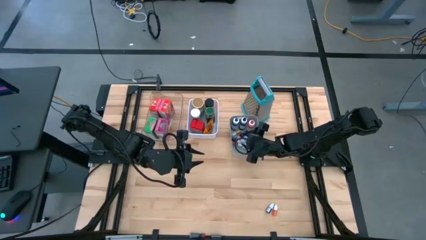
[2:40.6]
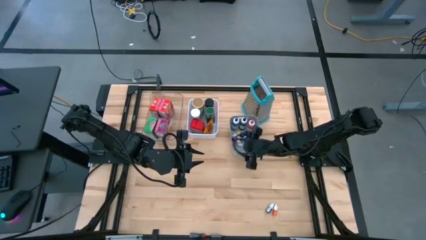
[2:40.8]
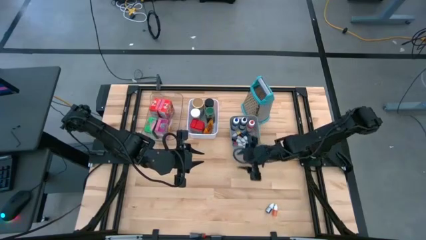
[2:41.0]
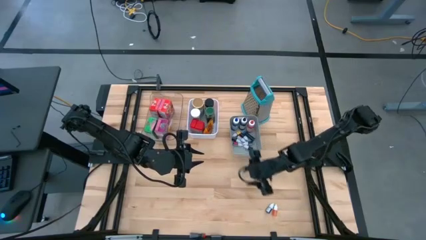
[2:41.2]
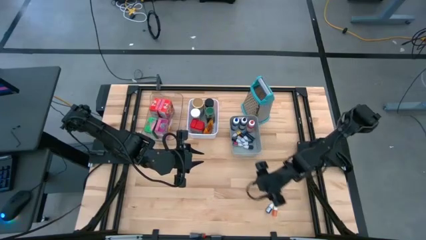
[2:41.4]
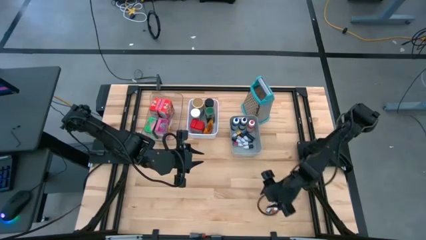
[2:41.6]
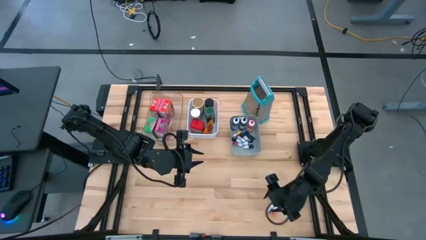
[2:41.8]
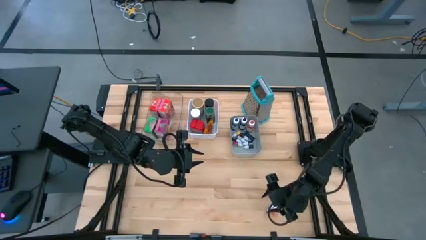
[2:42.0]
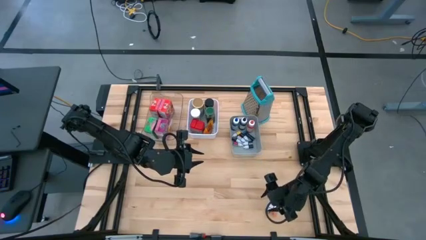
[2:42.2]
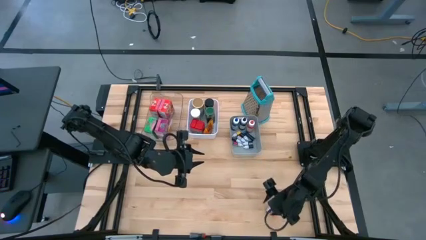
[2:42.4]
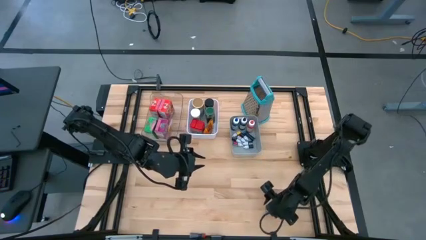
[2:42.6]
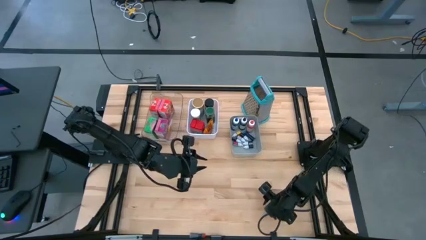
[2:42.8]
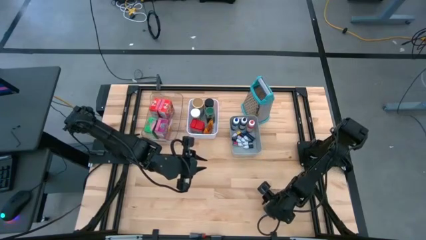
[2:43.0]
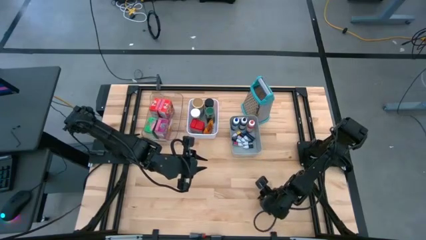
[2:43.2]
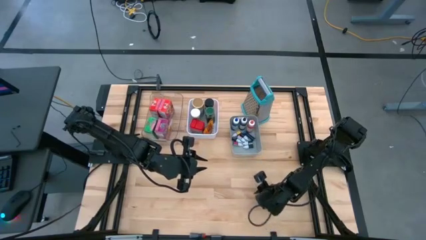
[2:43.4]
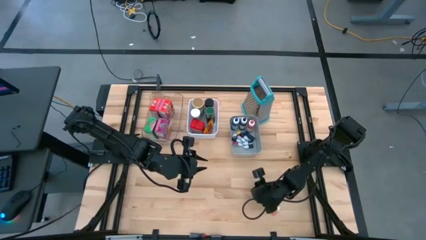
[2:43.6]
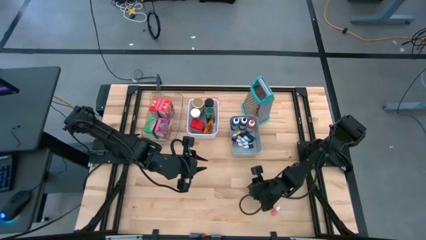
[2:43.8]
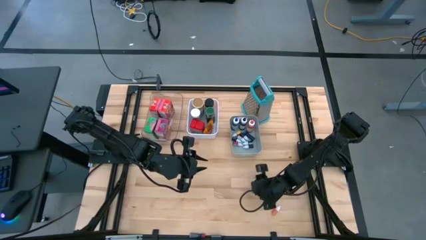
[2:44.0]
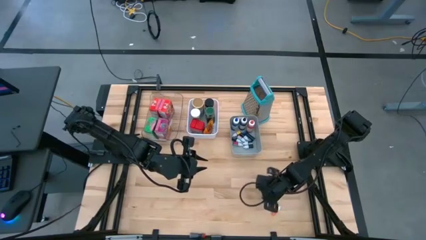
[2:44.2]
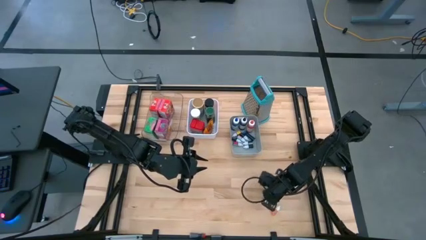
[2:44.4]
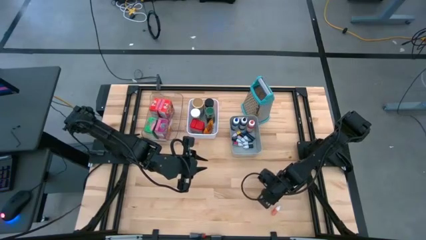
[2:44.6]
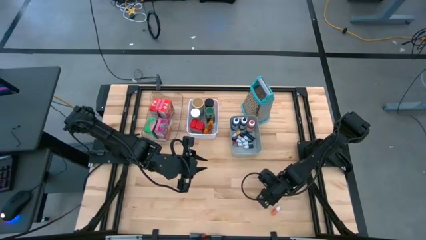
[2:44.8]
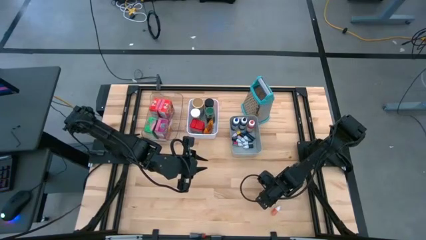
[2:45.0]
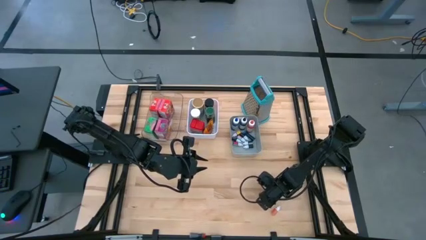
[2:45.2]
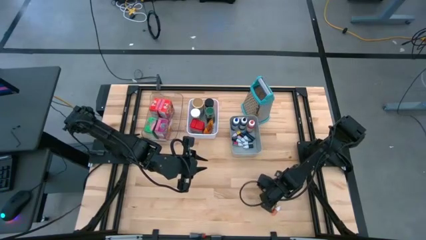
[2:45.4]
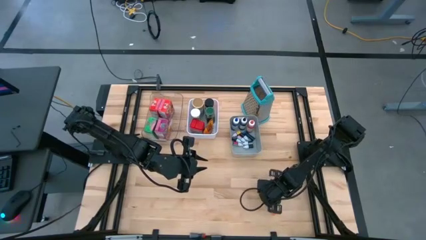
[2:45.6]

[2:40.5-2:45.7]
Task: Pick & Place Kitchen Items
Put the small violet food coloring into the gray bin

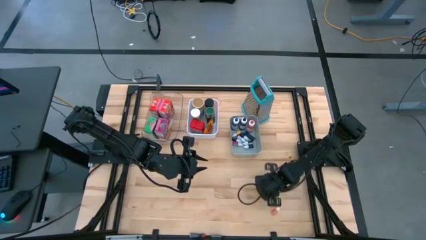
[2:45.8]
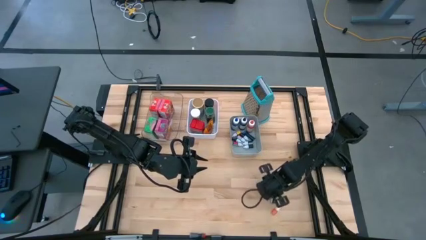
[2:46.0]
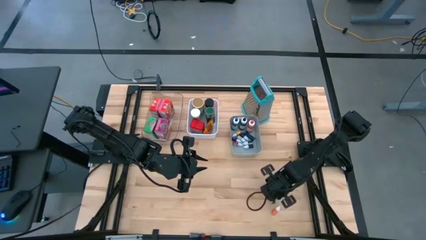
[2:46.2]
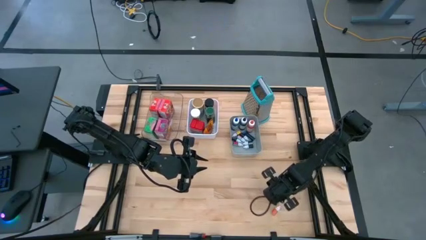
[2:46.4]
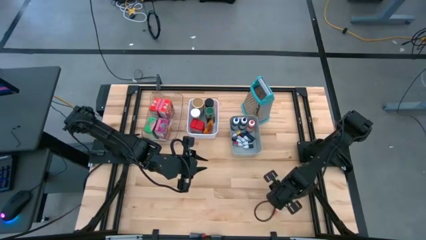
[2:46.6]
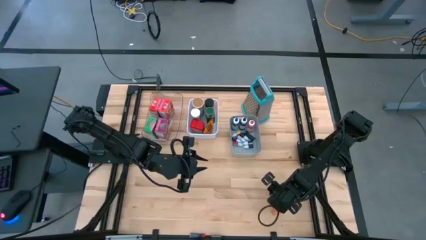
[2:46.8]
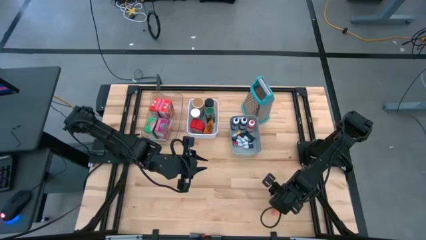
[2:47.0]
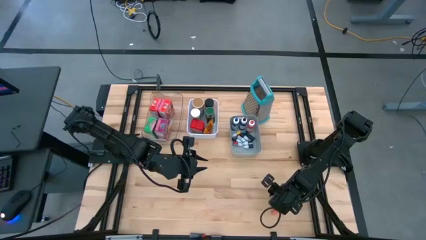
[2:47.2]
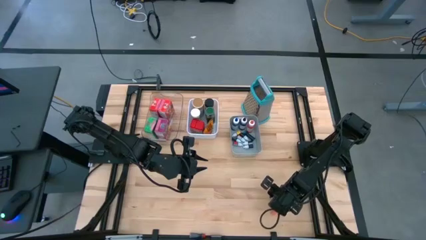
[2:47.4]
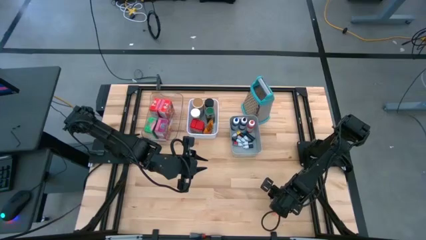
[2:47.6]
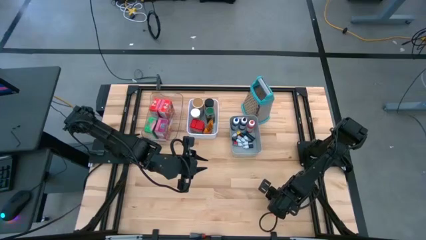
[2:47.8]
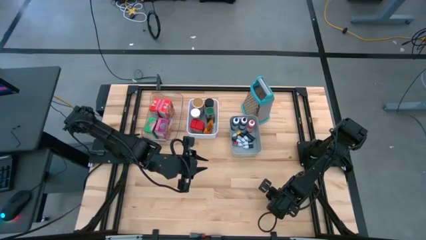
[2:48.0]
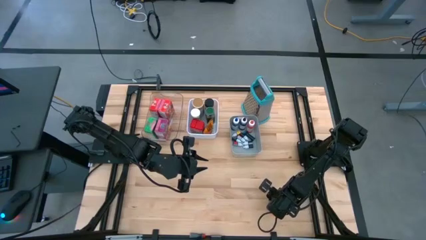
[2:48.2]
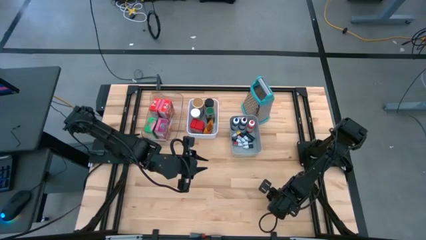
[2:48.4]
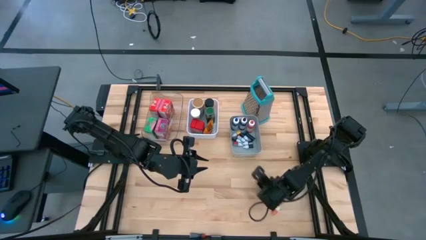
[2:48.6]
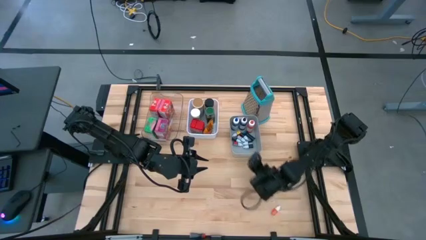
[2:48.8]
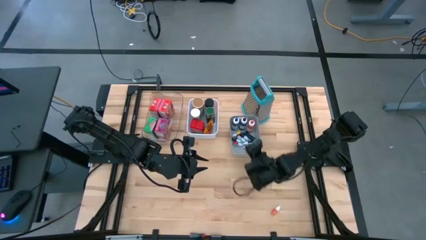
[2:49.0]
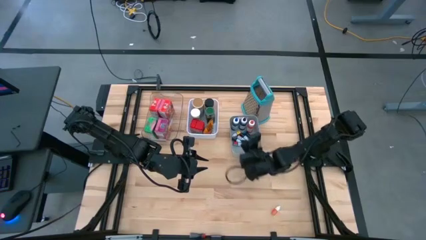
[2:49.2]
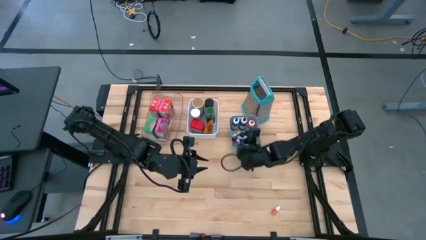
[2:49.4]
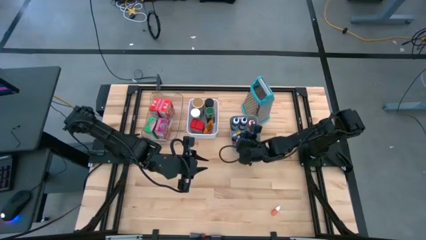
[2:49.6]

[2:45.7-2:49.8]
Put the small violet food coloring into the gray bin

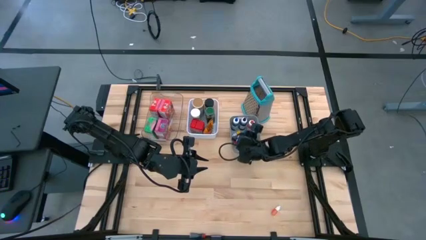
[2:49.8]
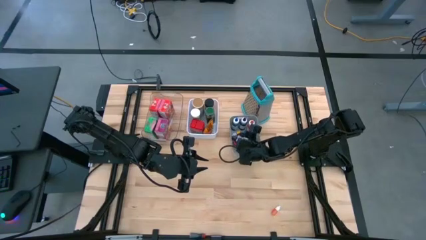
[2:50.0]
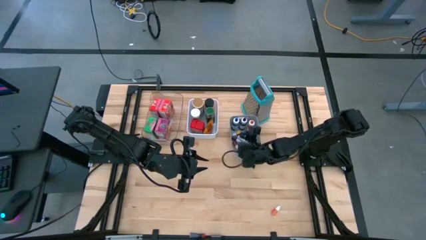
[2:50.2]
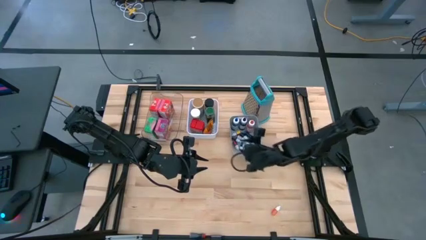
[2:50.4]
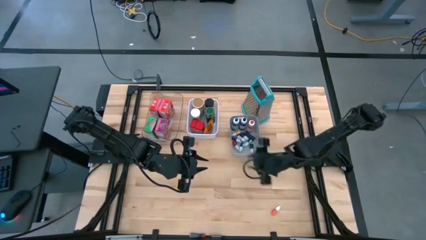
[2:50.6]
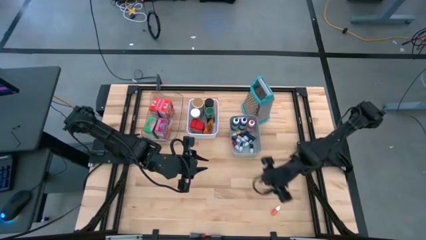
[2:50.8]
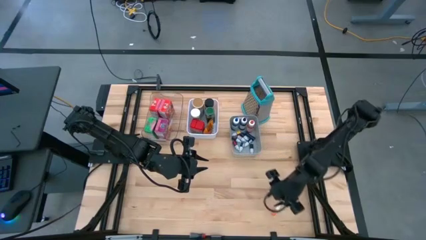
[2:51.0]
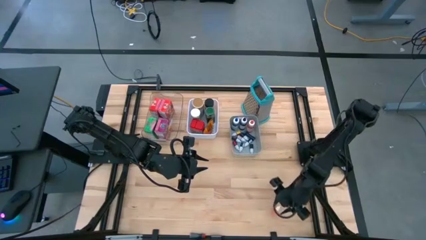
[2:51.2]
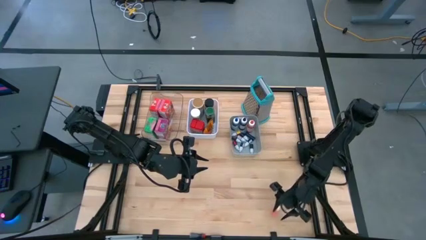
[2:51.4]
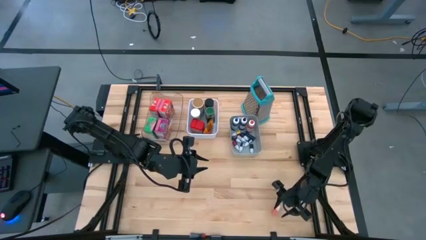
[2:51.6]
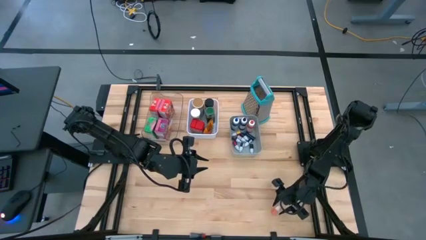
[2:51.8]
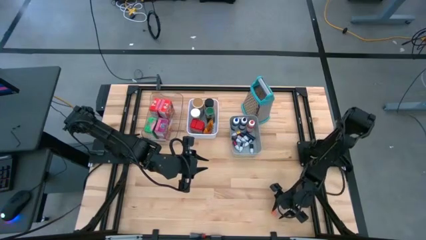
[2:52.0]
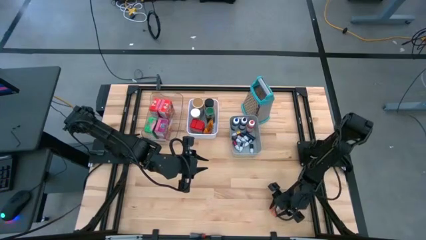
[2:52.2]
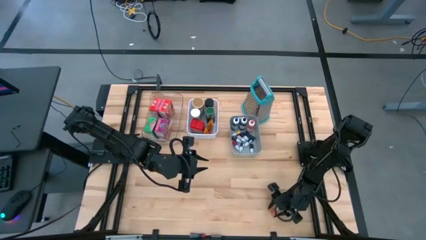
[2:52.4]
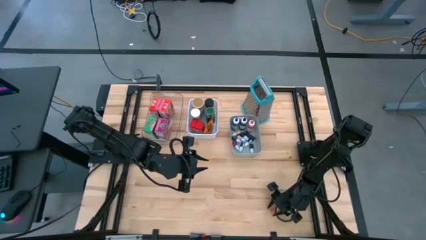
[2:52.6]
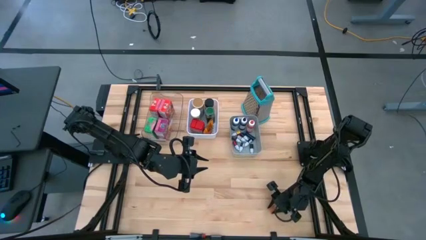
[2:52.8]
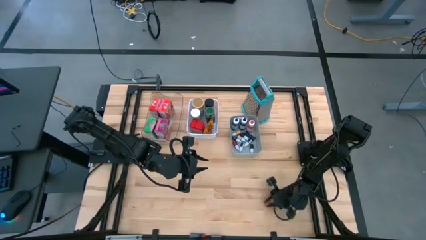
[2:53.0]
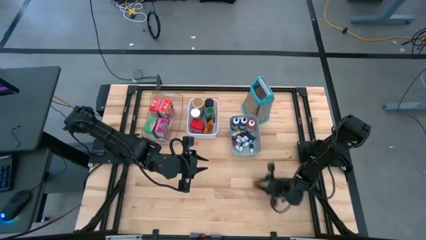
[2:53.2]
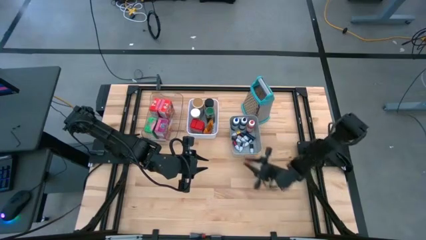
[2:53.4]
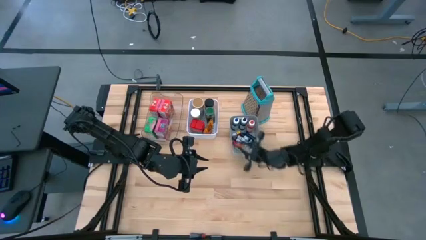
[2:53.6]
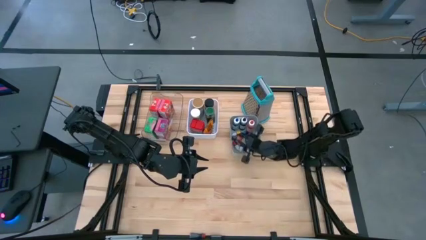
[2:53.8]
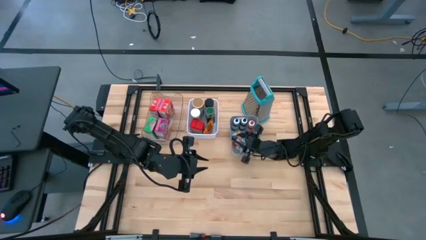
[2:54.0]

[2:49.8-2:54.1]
Put the small orange food coloring into the gray bin
